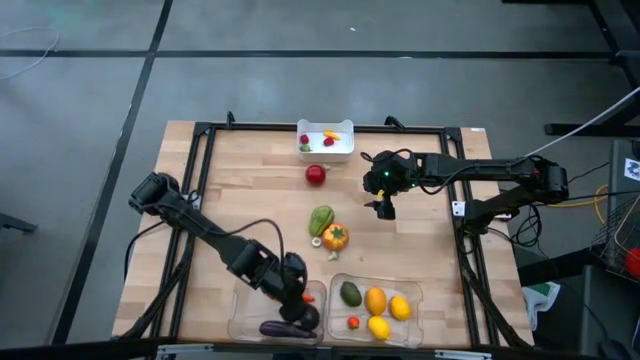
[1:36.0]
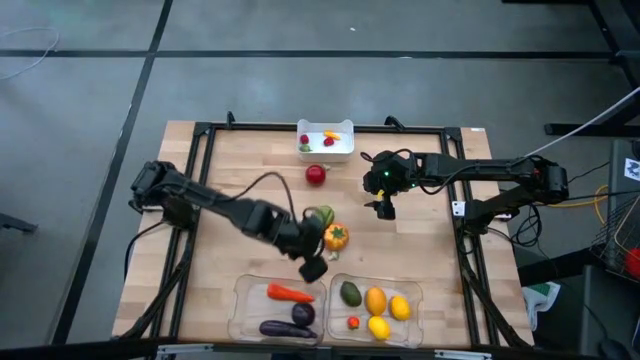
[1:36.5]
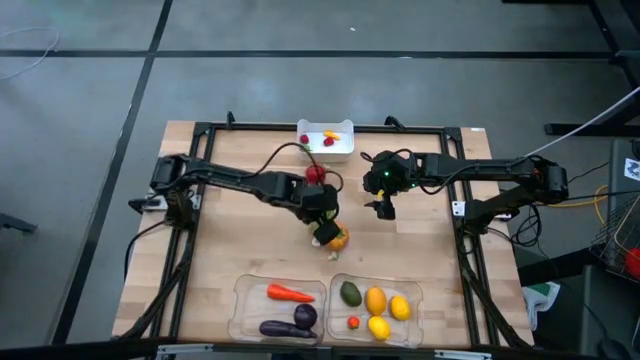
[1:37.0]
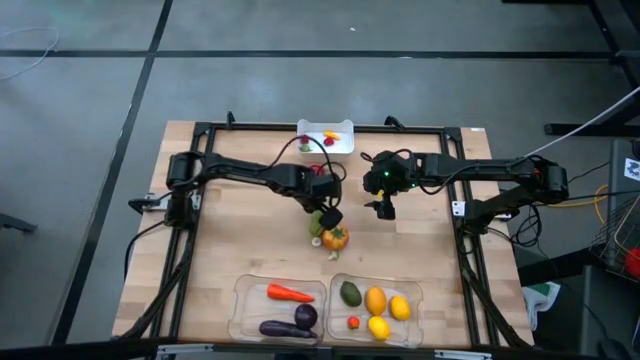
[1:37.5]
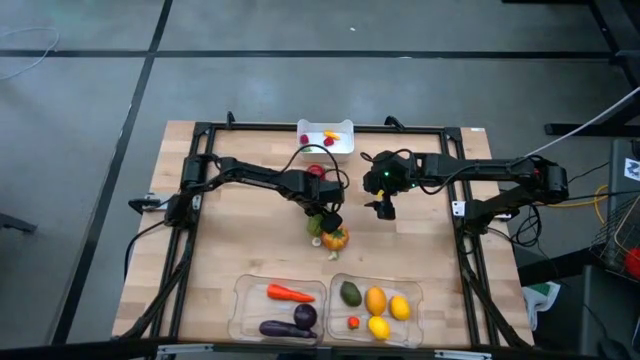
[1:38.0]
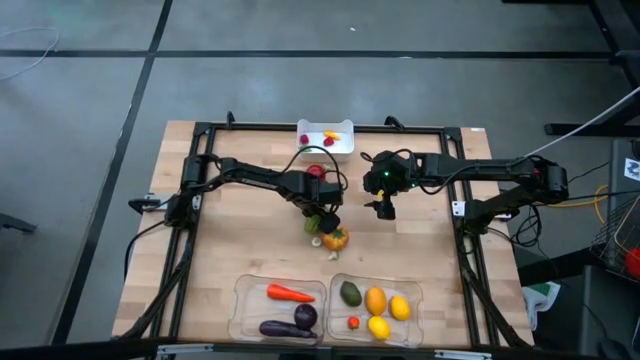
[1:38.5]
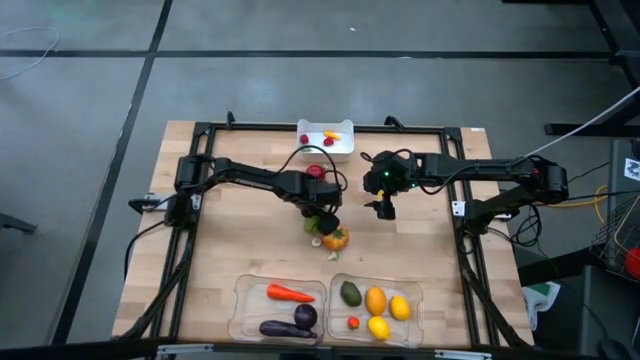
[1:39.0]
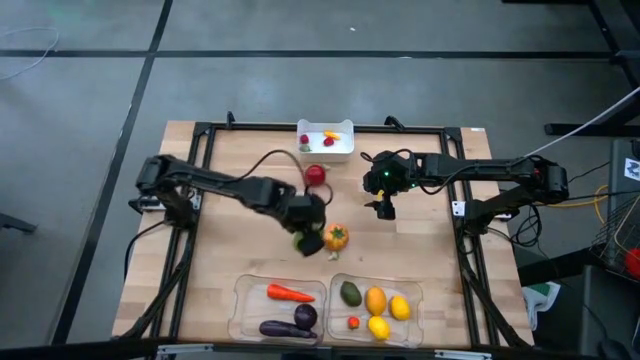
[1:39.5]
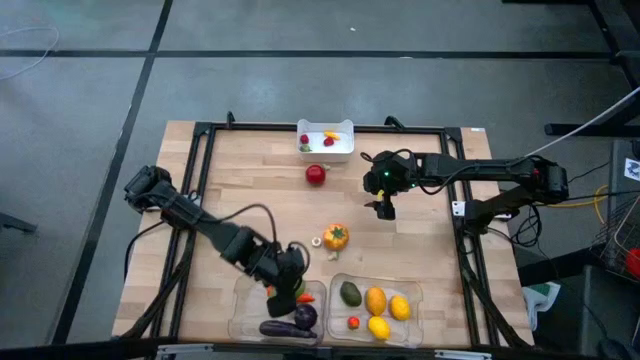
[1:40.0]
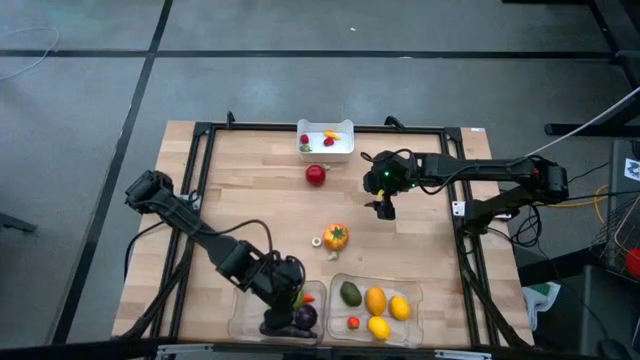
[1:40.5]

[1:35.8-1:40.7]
Task: Sort produce into baskets
Put the chayote into the left transparent bin

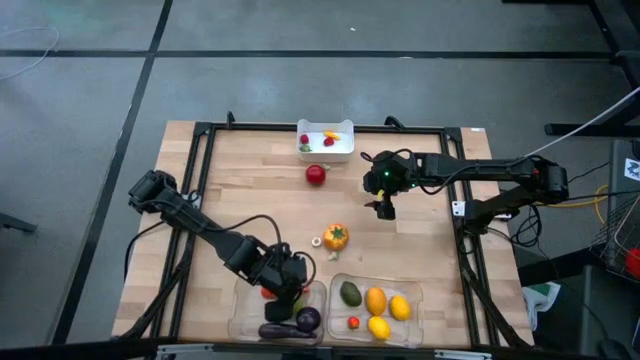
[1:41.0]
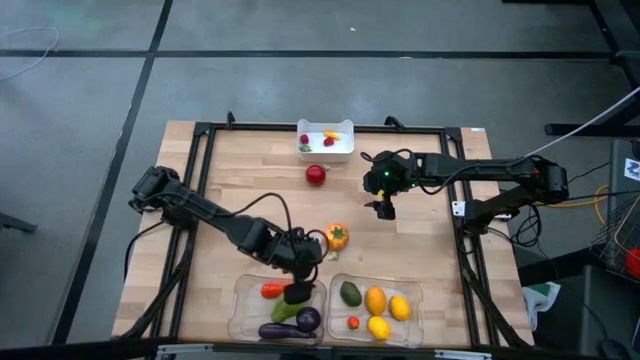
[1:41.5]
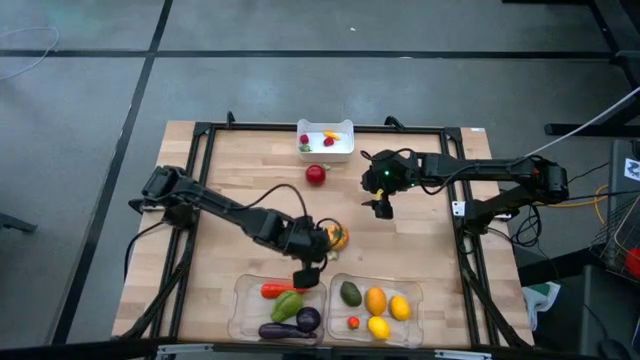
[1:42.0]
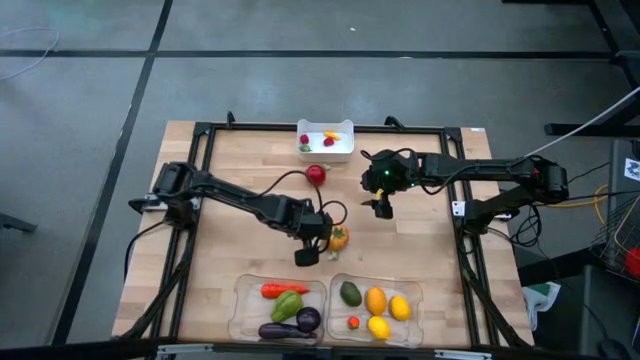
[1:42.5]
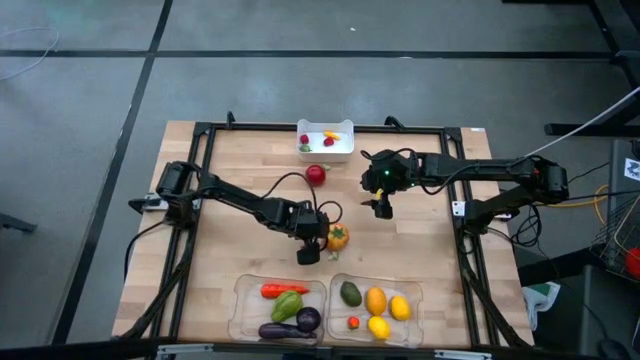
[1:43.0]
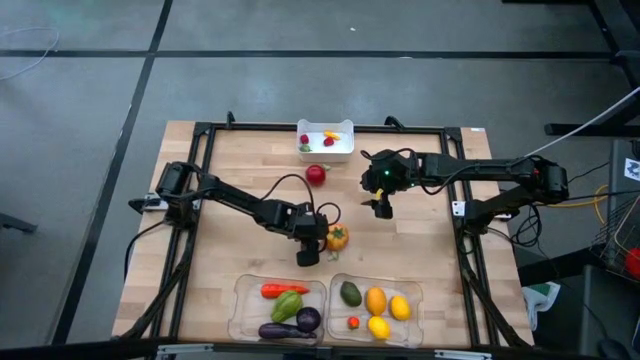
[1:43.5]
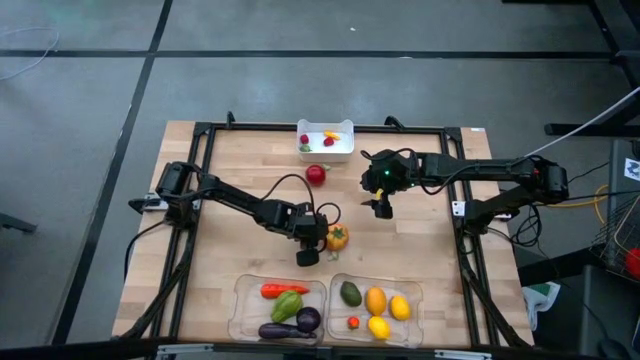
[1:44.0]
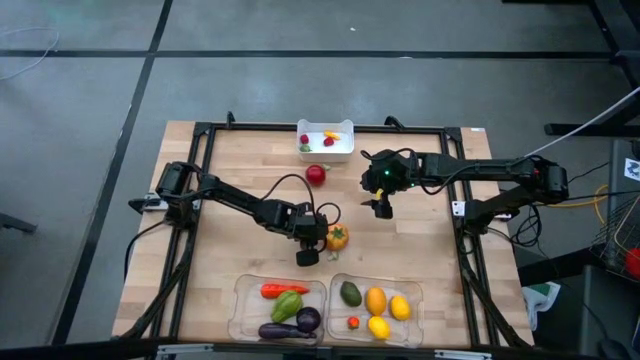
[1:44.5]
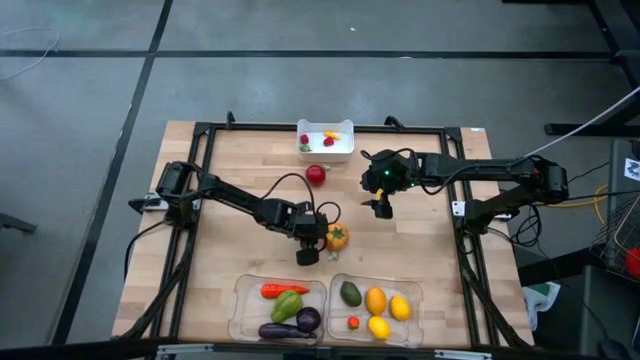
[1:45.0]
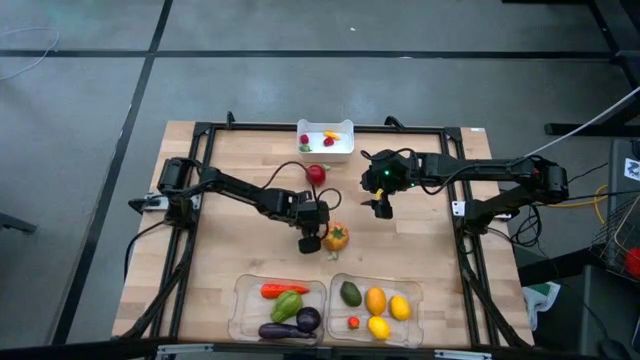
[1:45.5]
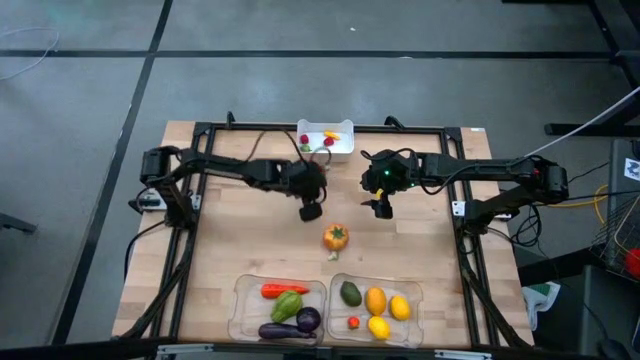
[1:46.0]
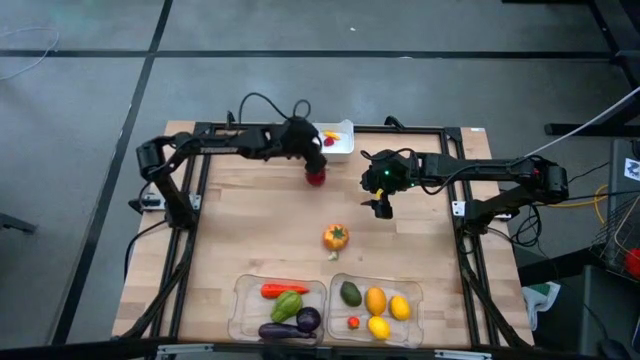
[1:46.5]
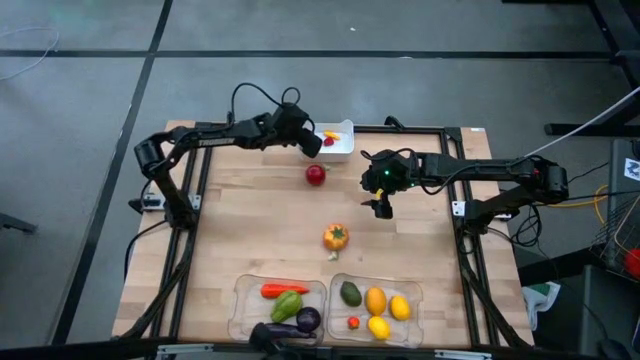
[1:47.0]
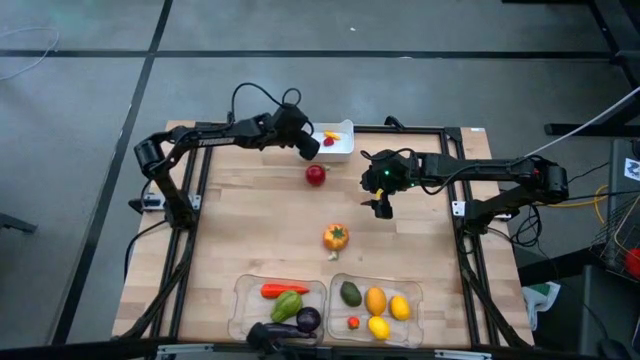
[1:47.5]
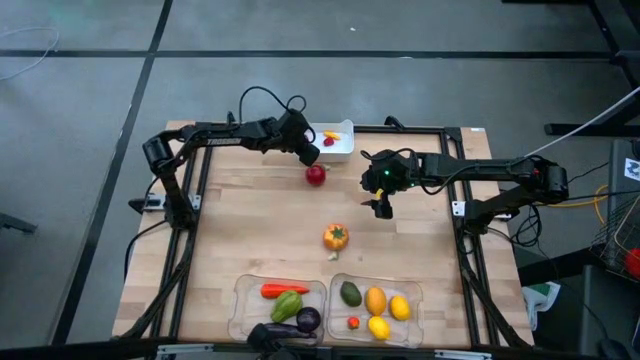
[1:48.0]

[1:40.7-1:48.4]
Put the mushroom into the white bin

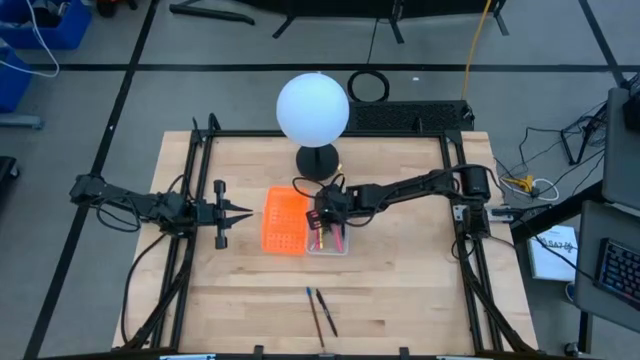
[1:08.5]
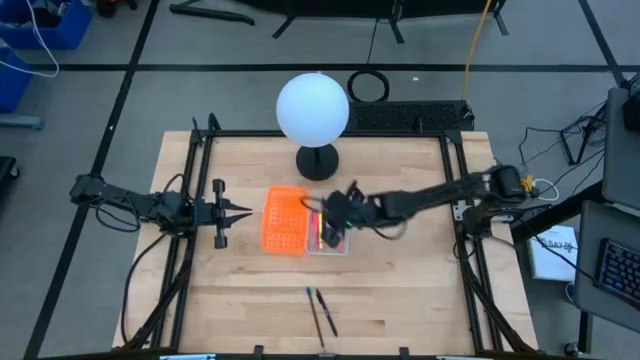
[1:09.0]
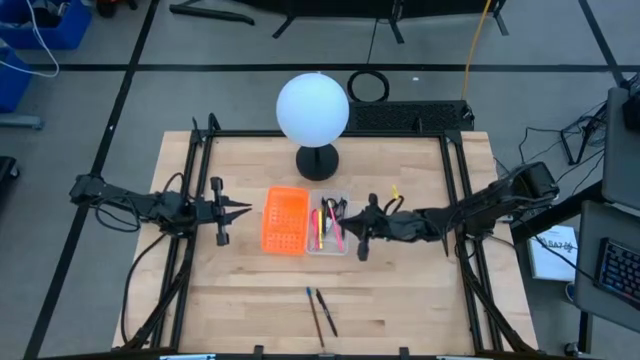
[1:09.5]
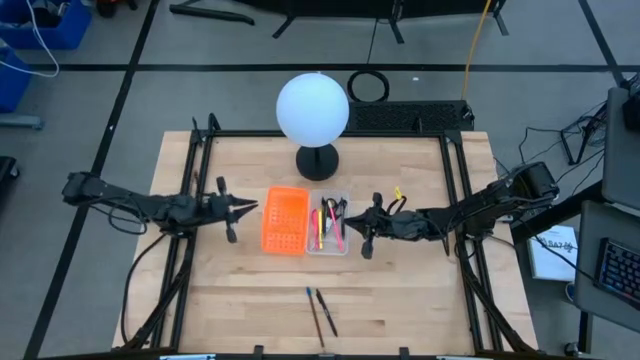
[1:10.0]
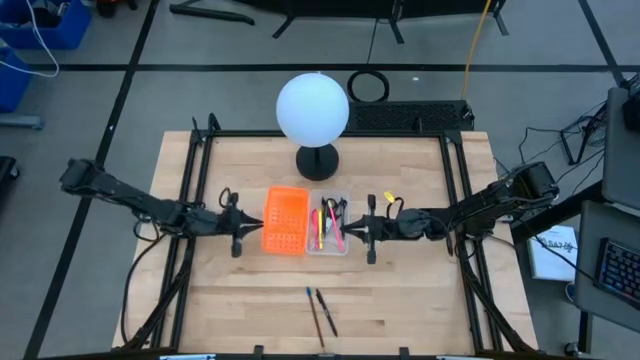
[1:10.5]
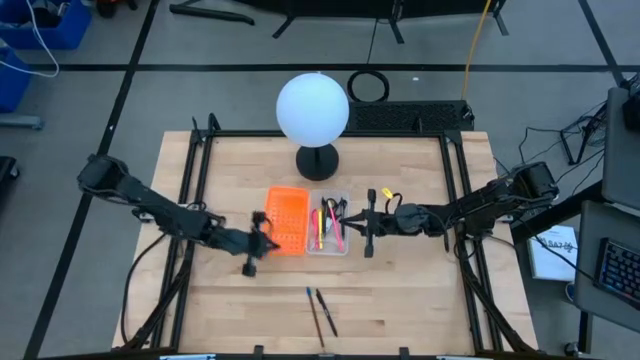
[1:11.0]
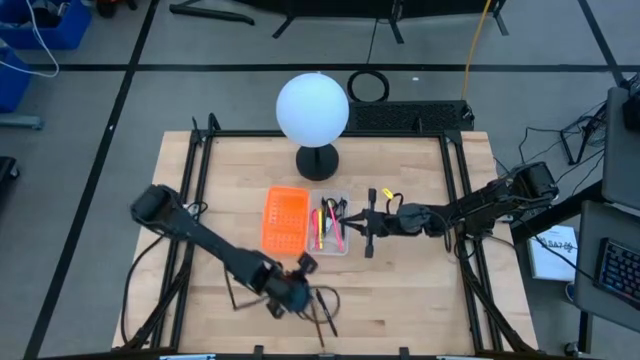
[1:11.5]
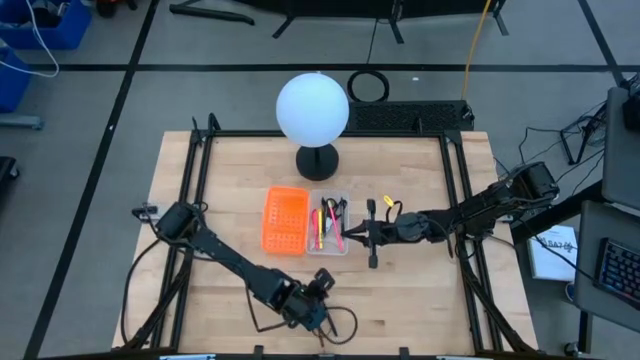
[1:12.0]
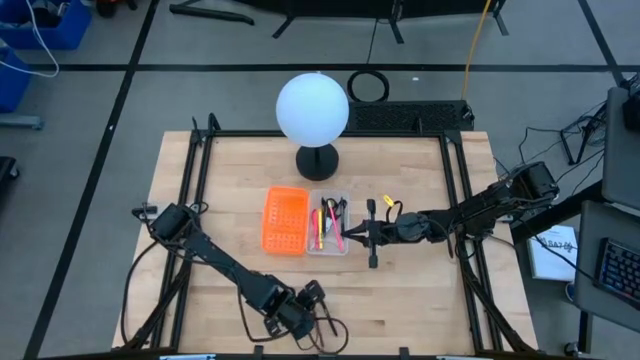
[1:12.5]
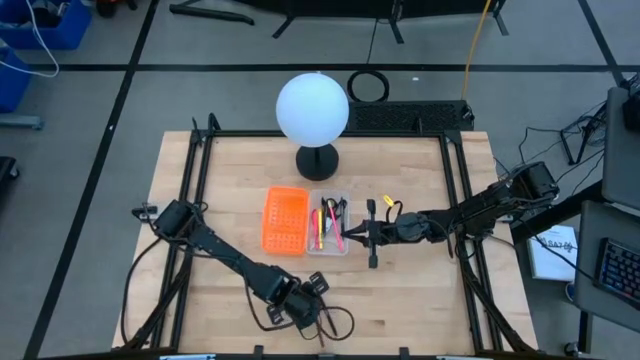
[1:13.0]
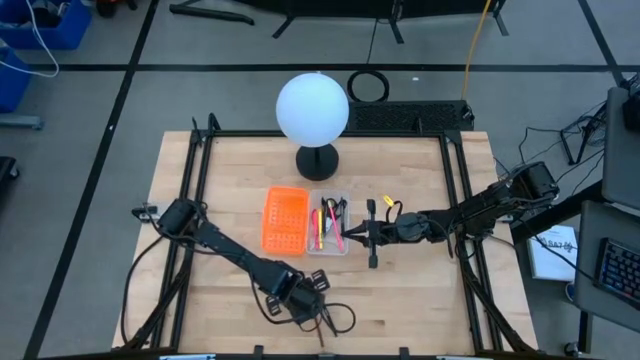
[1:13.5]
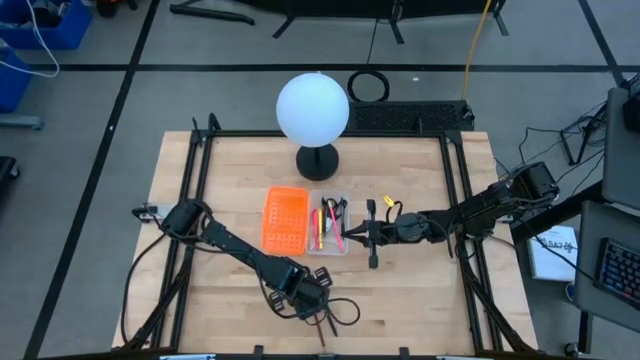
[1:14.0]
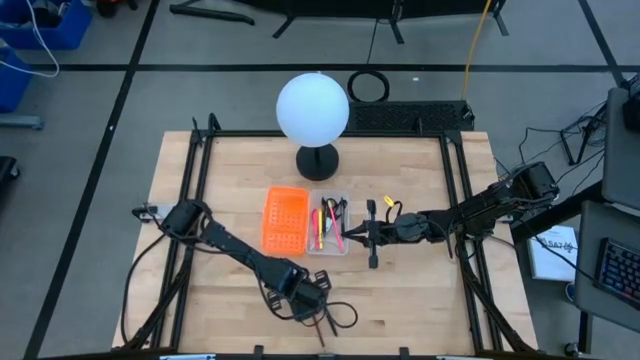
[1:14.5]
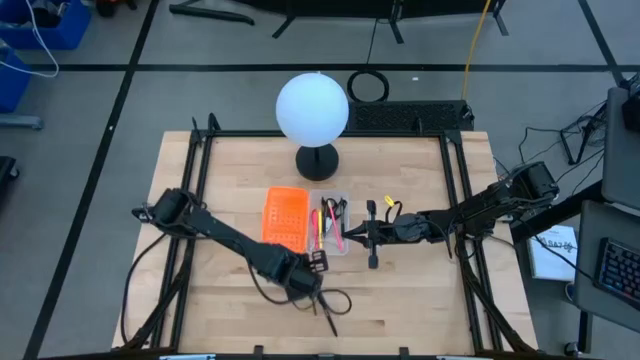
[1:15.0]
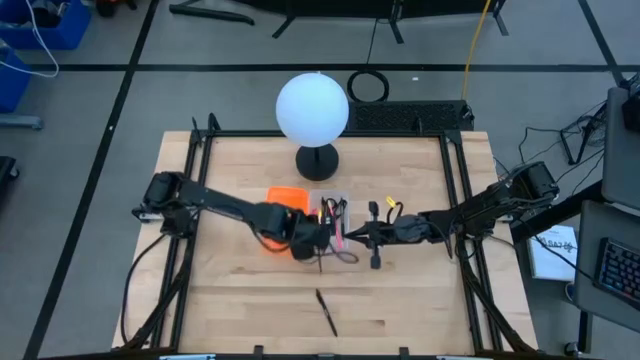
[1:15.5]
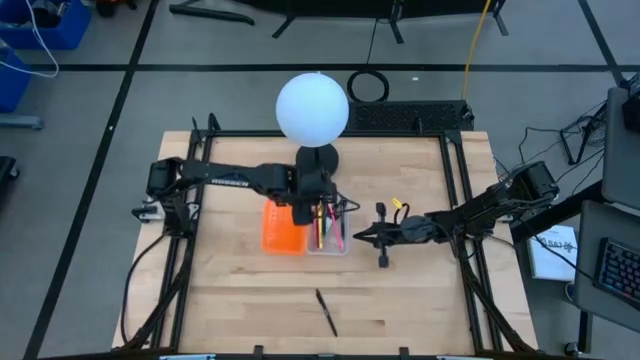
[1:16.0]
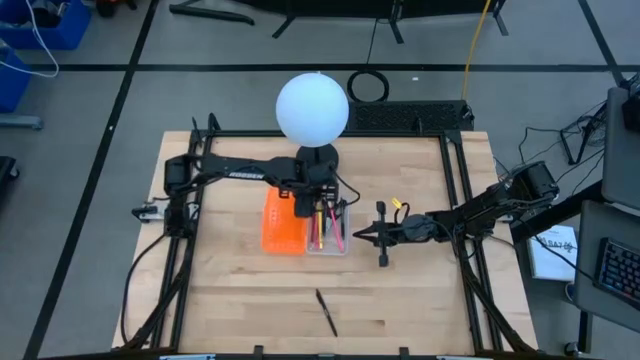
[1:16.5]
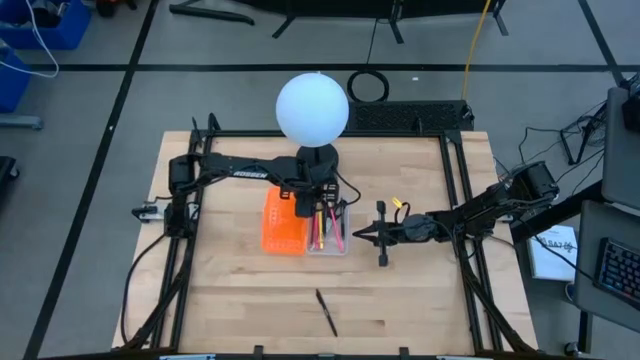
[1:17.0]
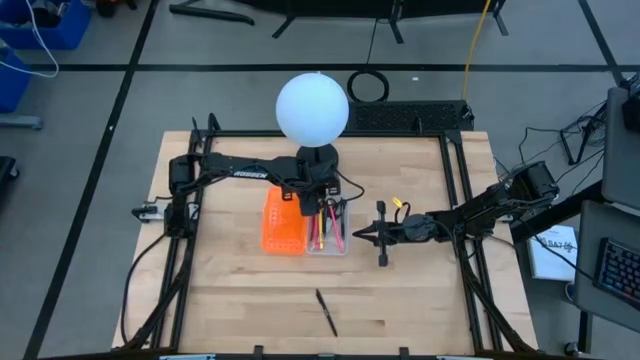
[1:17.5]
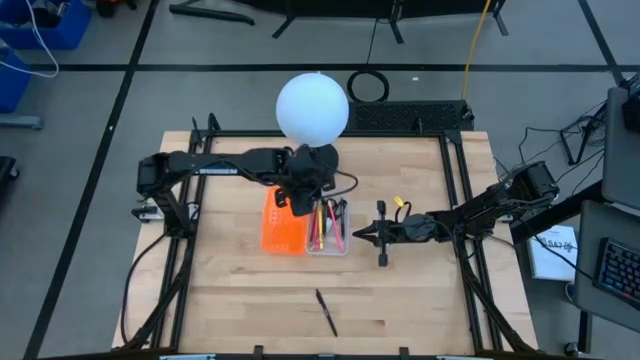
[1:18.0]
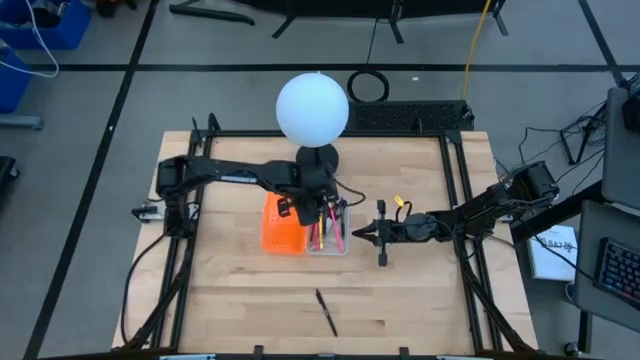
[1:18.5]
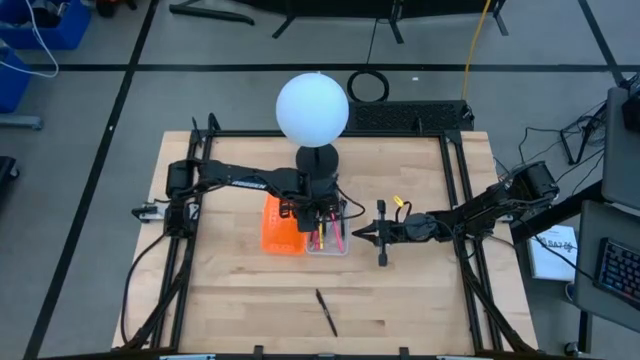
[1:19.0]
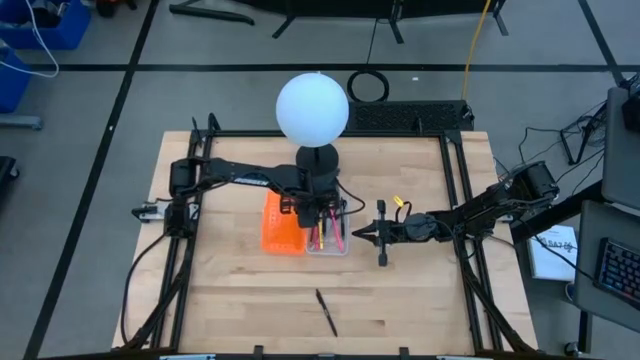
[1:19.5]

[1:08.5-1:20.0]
Task: Pick & place school supplies into a supply box
Put the brown pencil into the orange supply box
